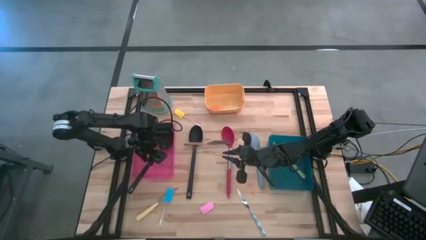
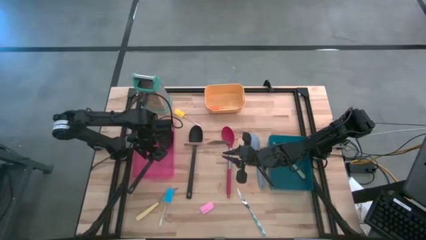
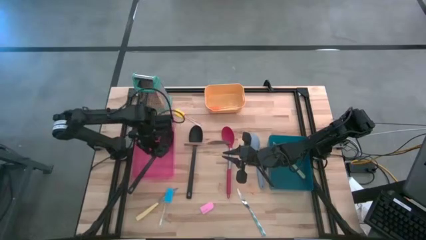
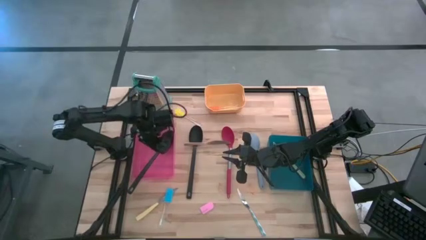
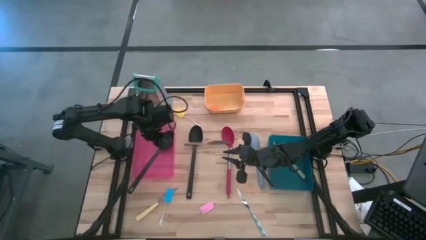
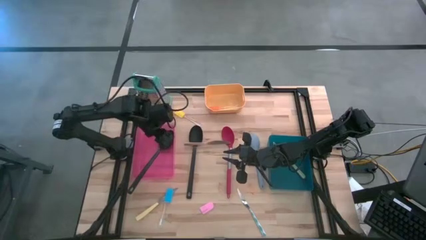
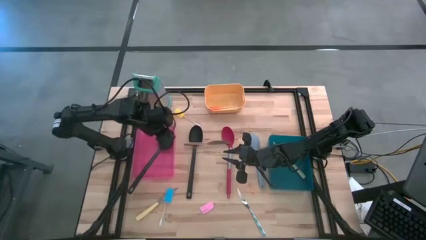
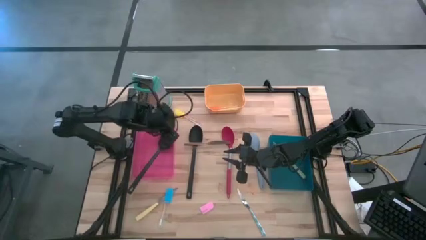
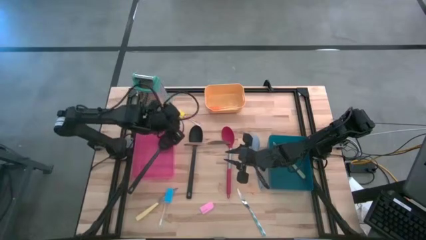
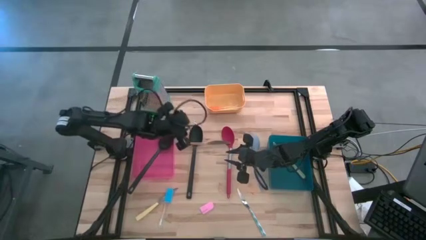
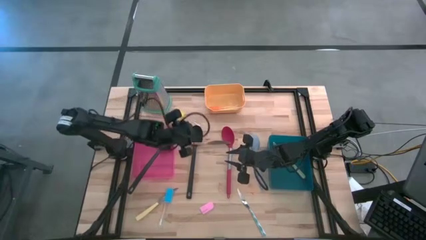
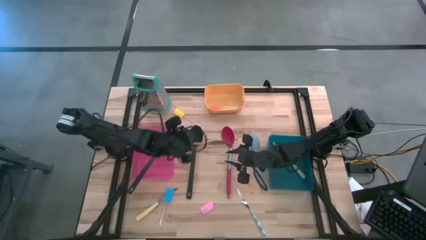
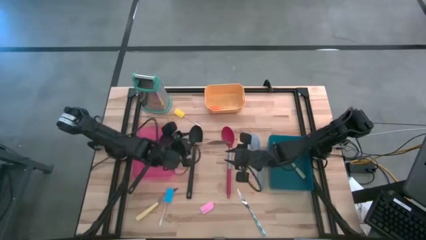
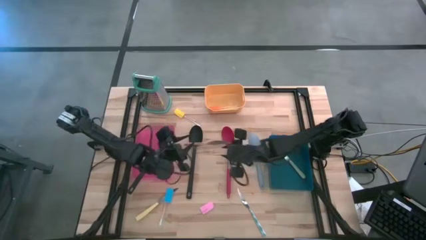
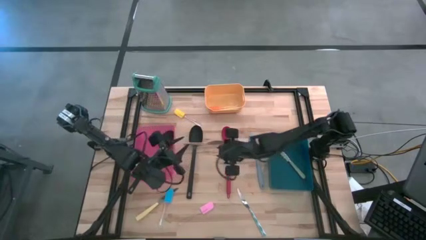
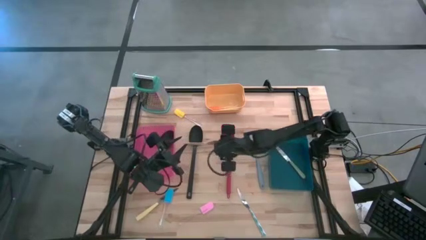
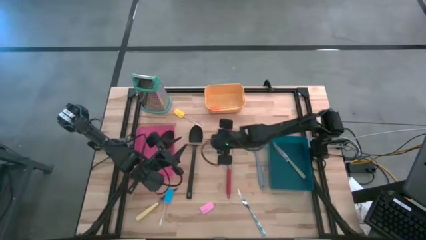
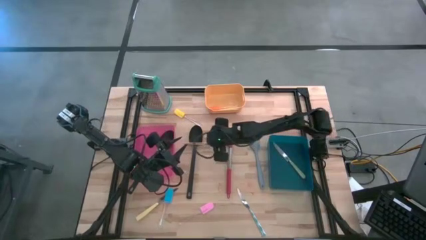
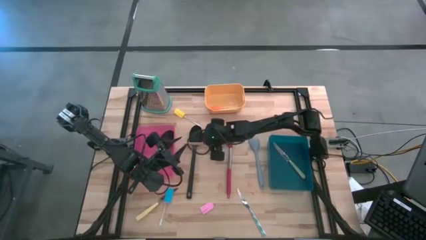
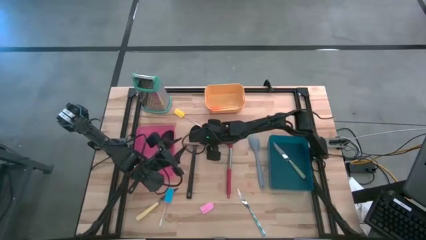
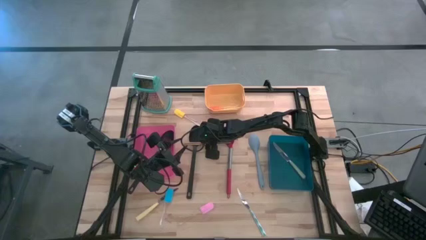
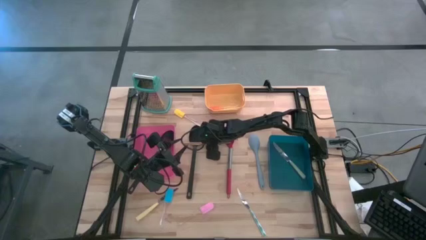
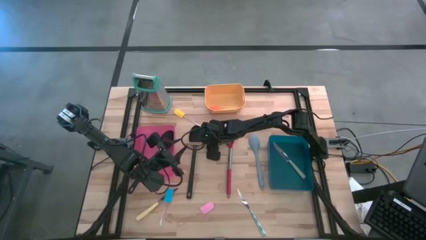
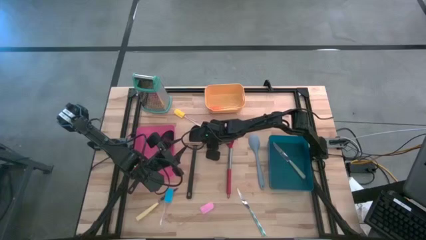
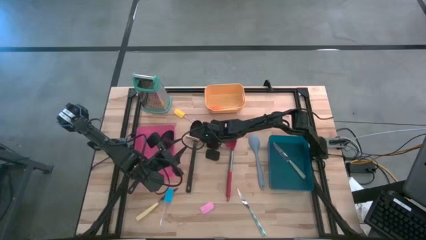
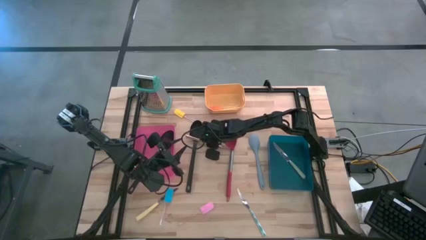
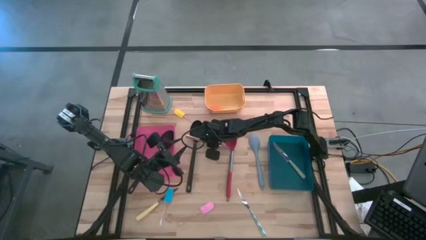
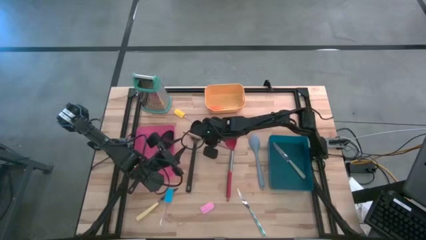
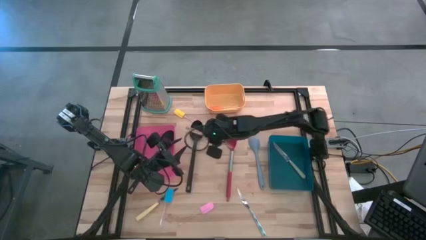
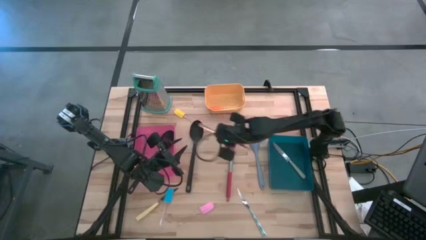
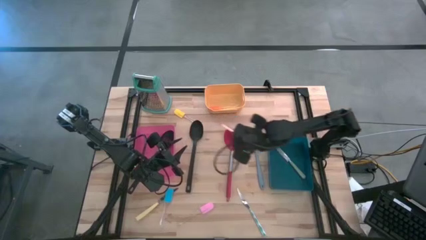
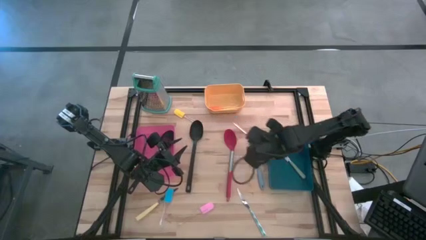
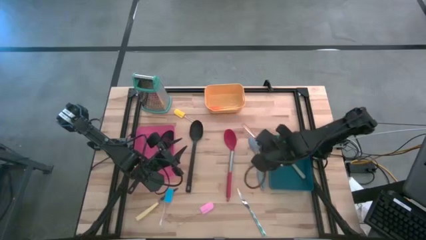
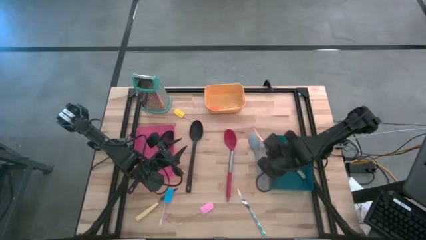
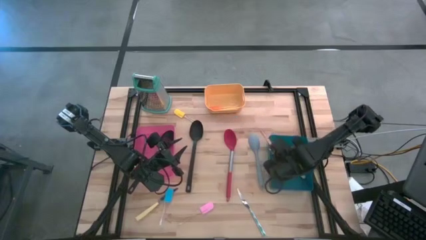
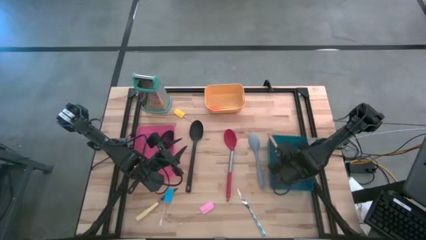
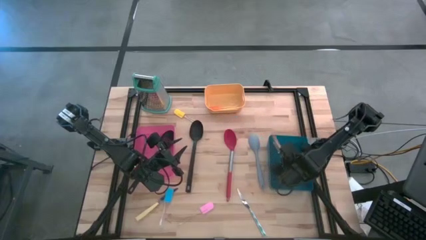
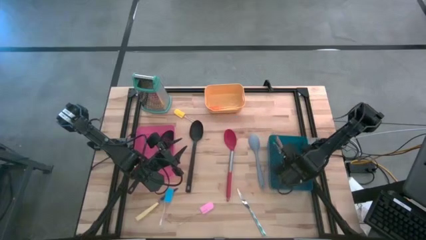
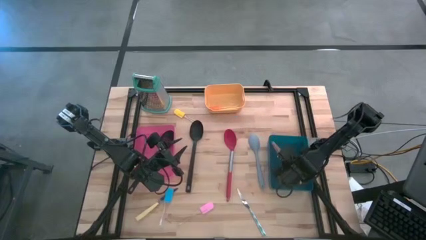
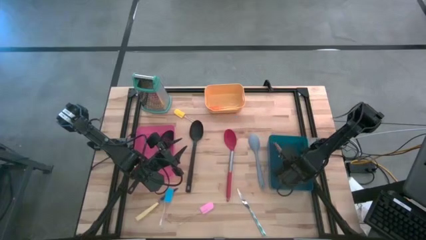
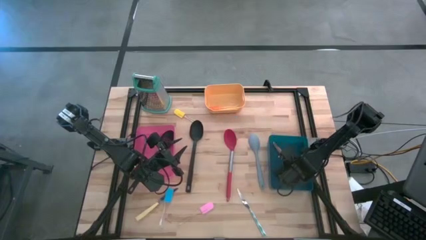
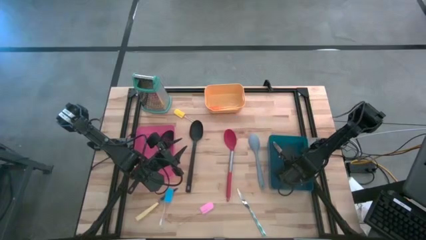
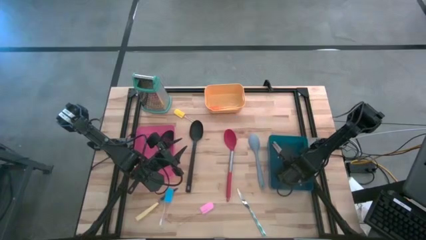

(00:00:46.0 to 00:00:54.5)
Task: Pick & Place Kitchen Items
Put the gold knife into the blue bin

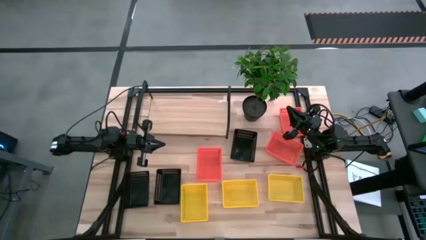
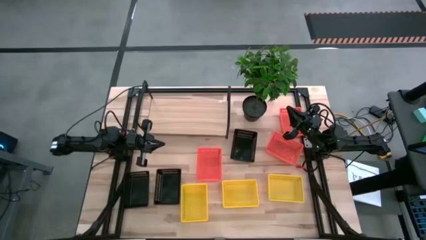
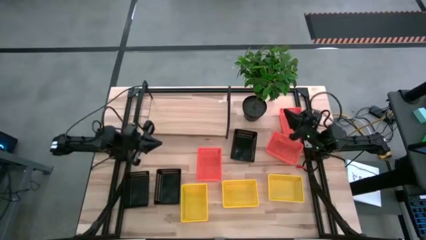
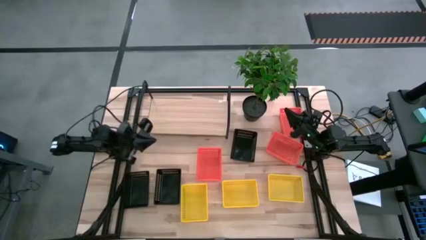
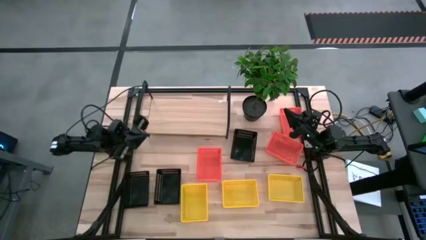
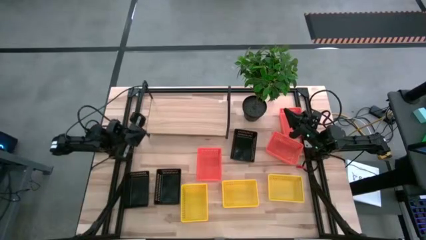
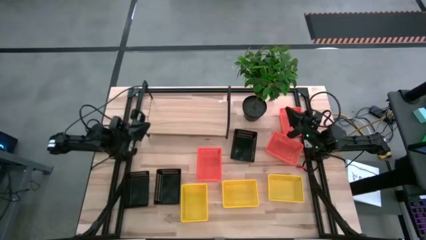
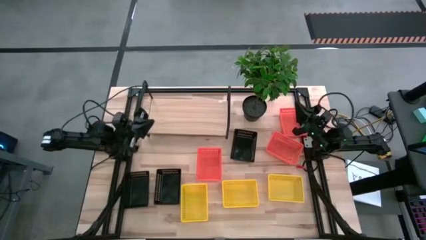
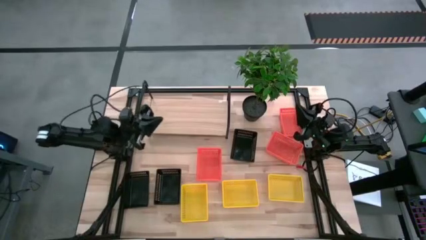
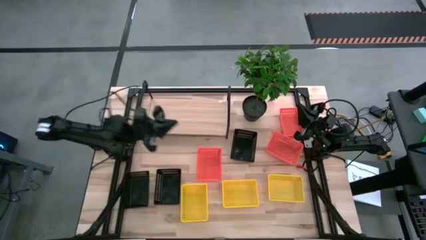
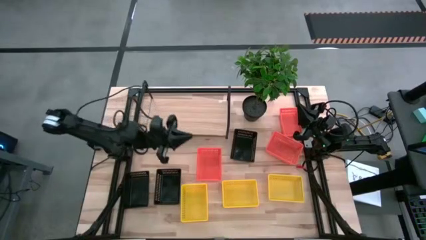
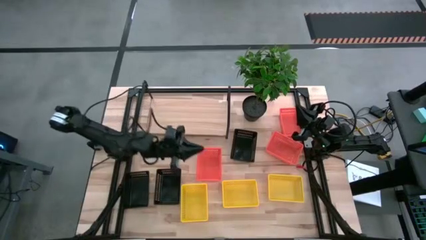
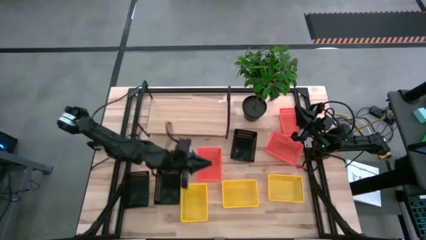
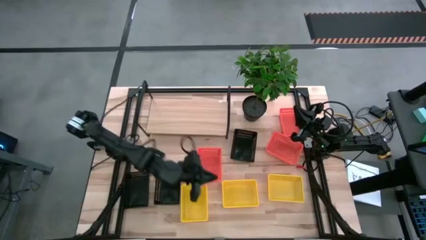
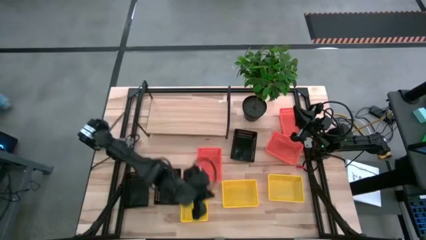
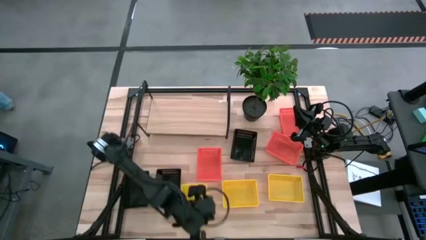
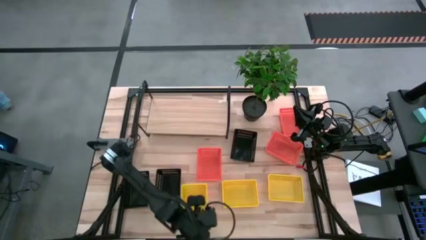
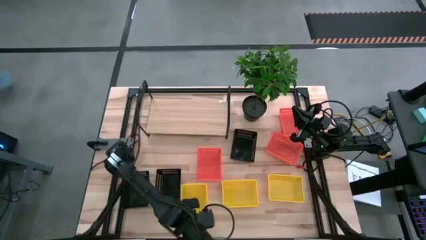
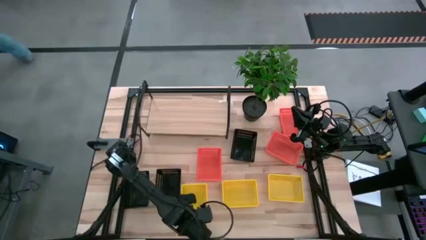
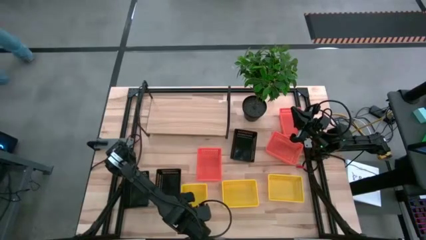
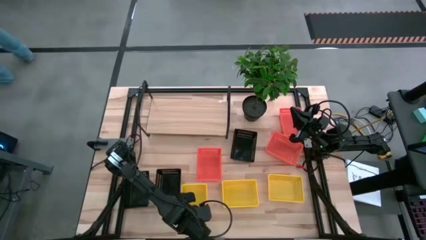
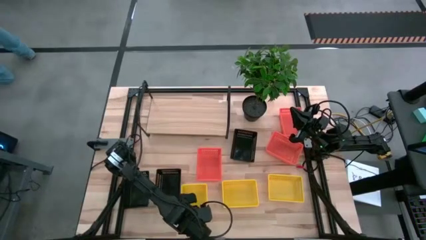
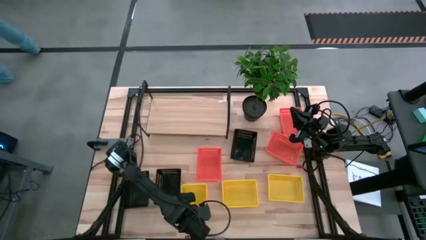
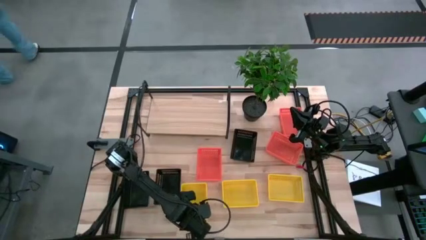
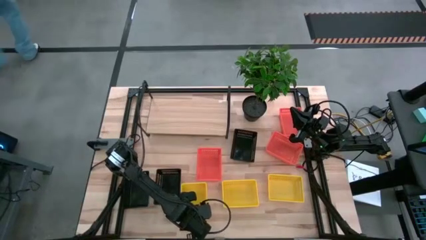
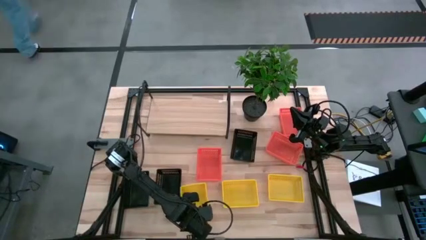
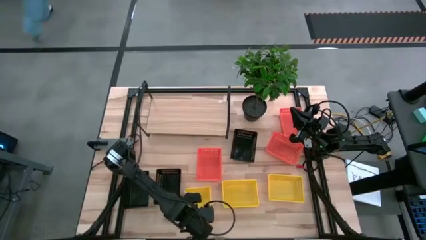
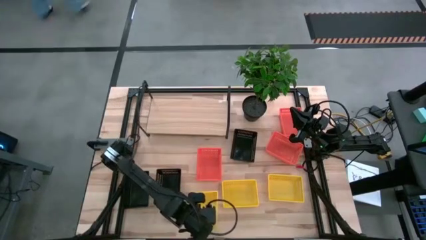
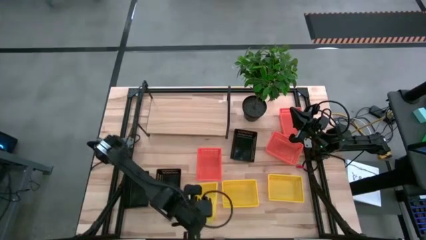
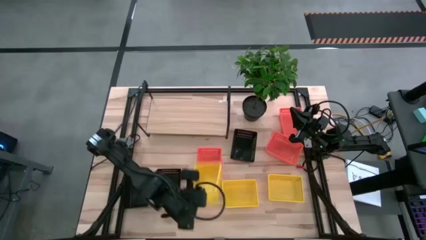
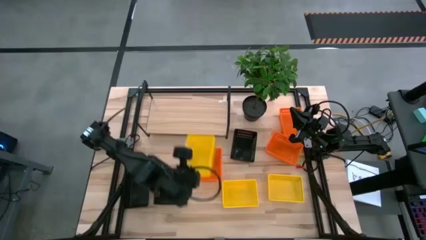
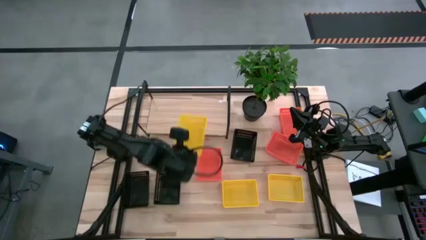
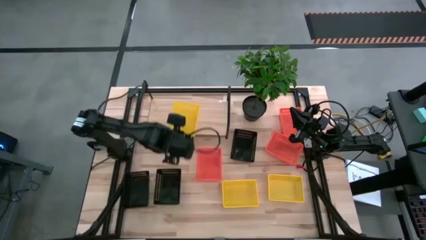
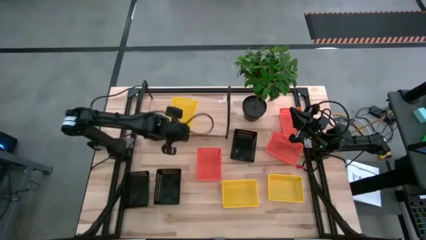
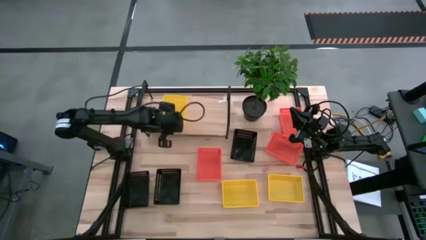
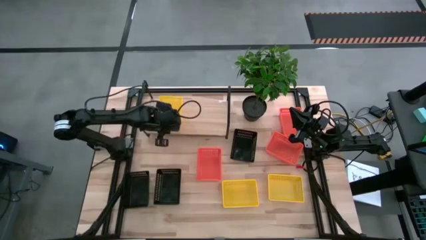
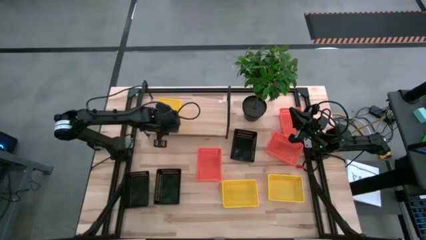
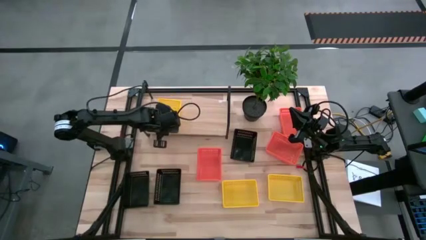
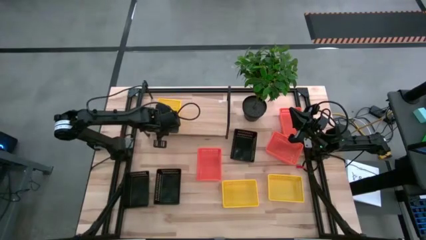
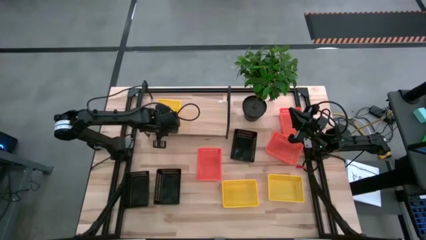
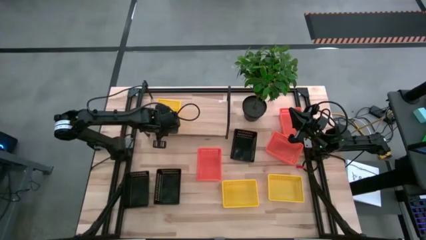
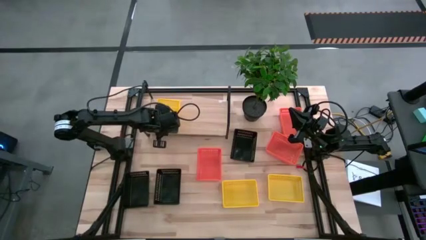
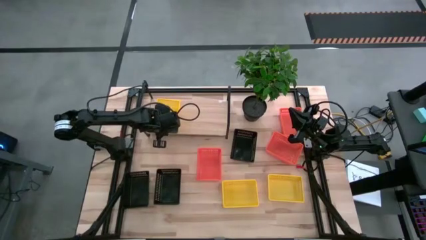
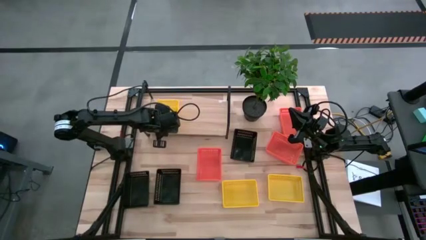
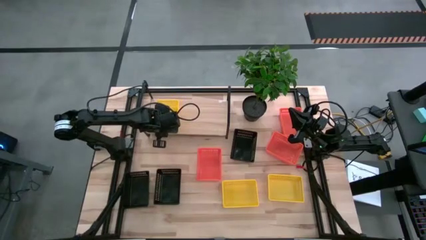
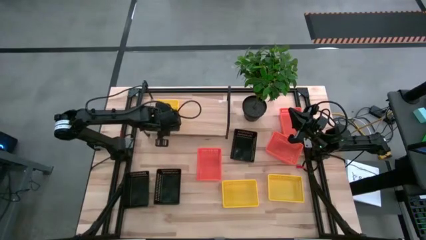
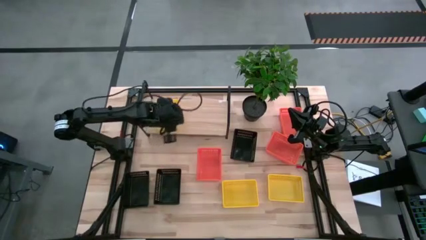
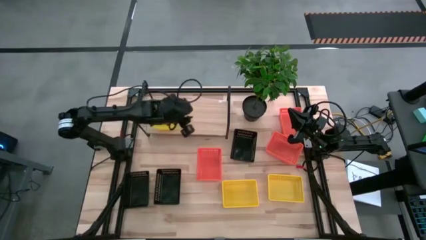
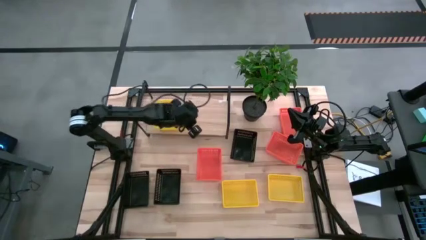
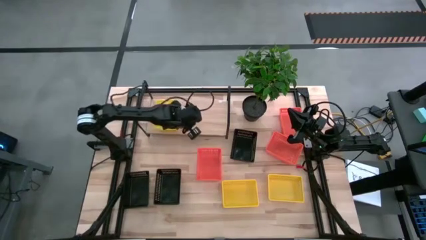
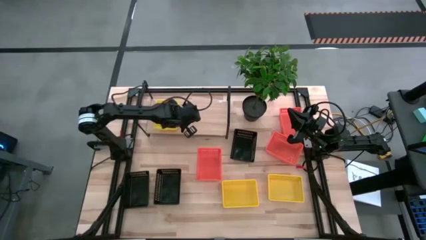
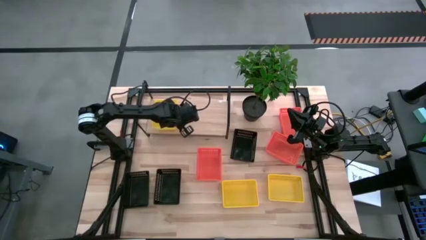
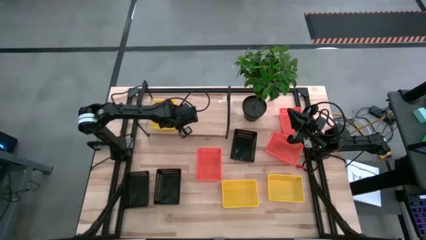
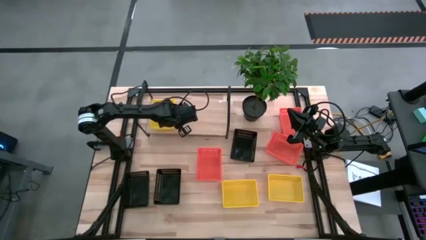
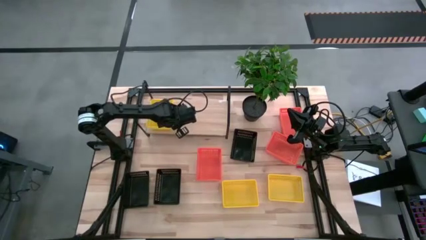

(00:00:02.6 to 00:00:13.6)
Task: Stack baskets on shelf by color
Put the left yellow basket on the shelf
